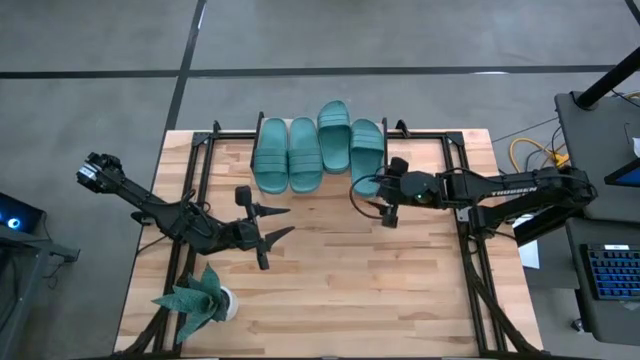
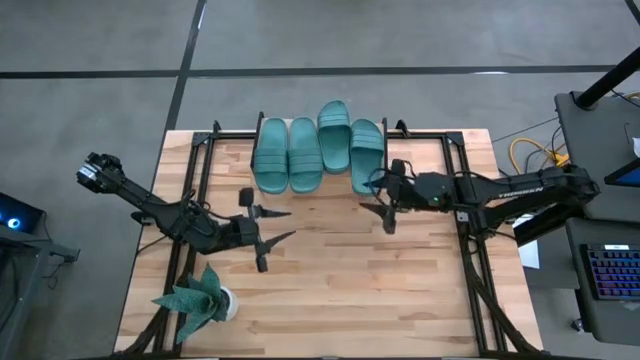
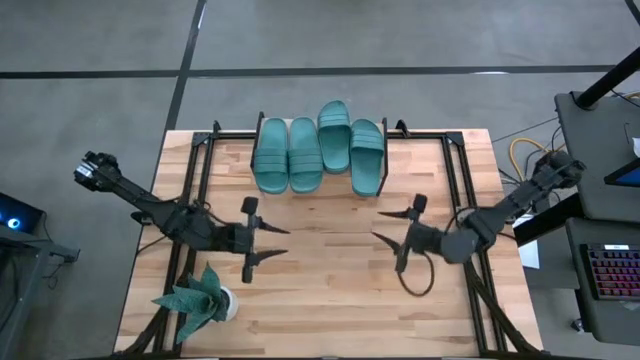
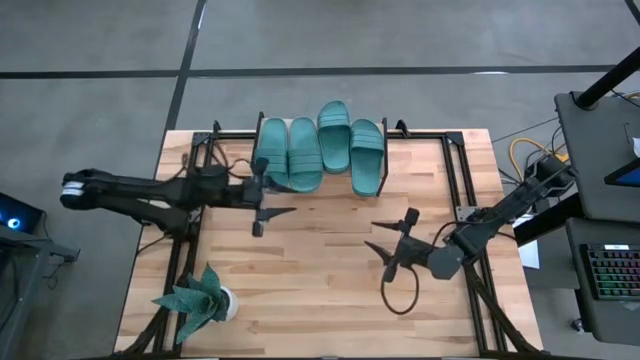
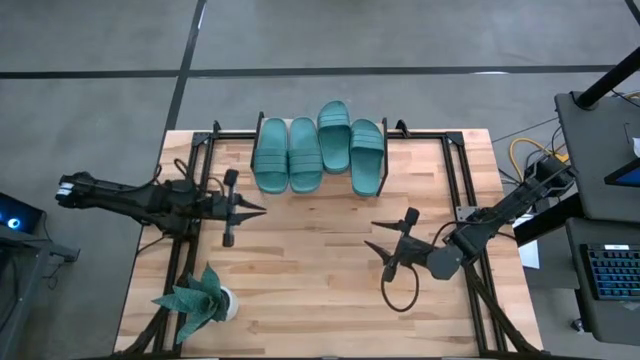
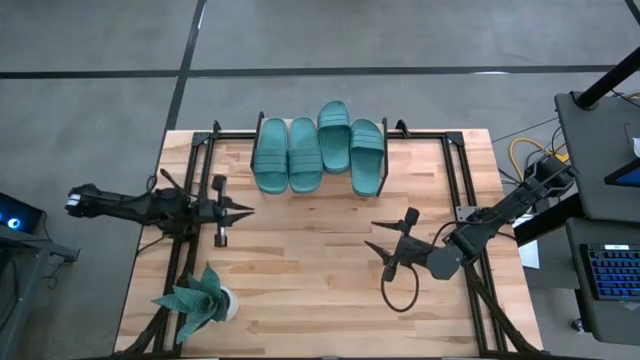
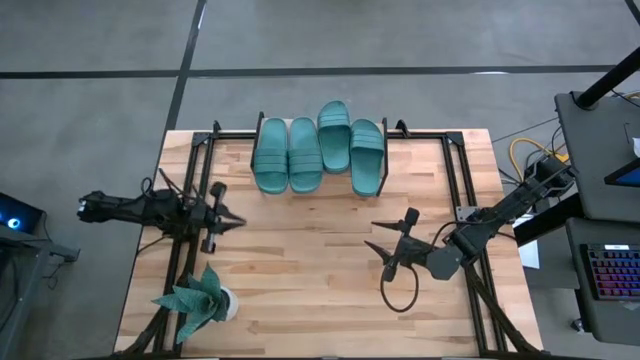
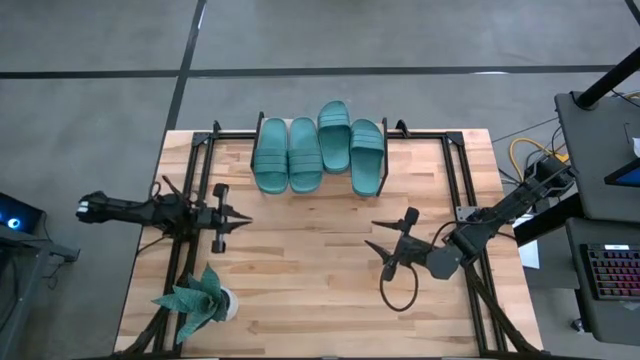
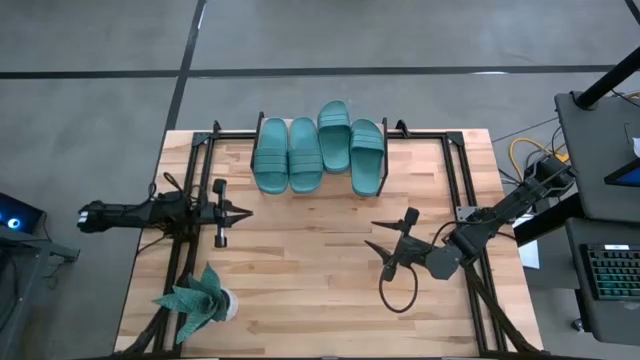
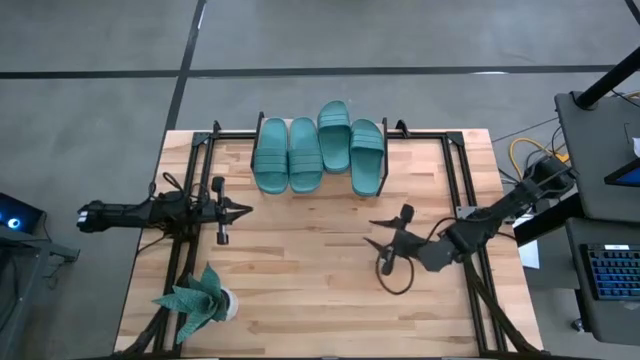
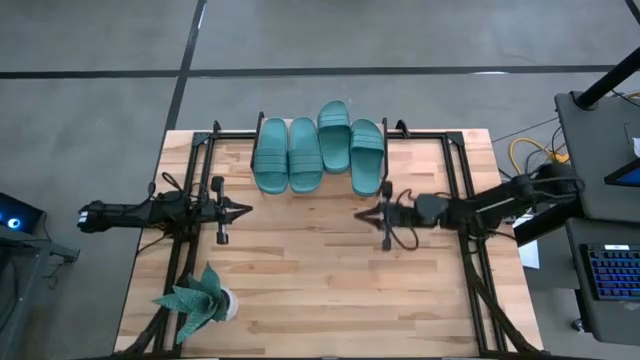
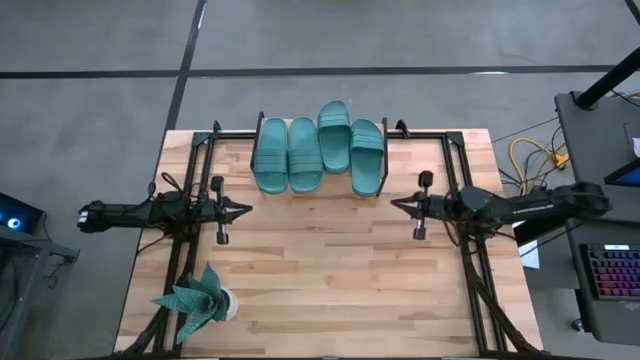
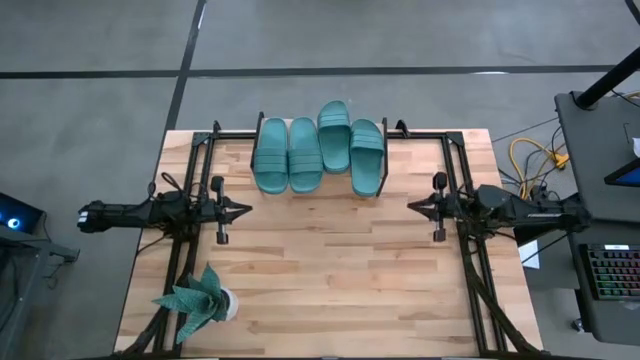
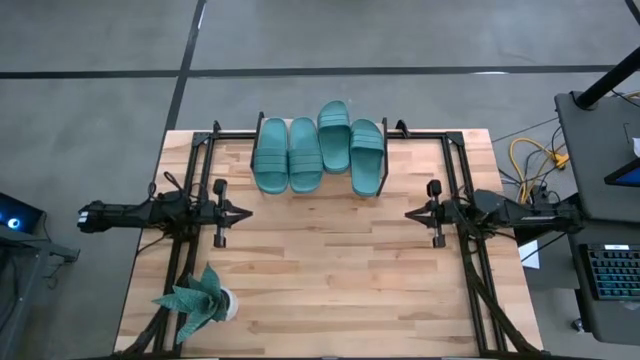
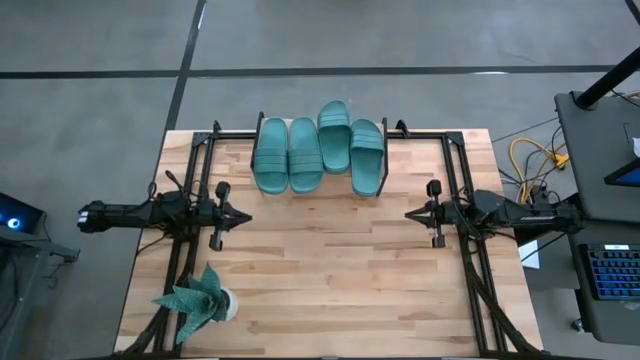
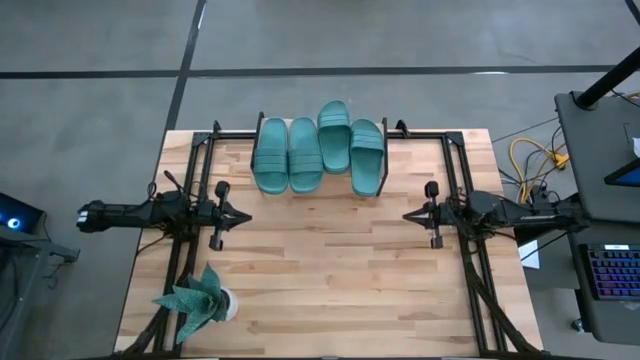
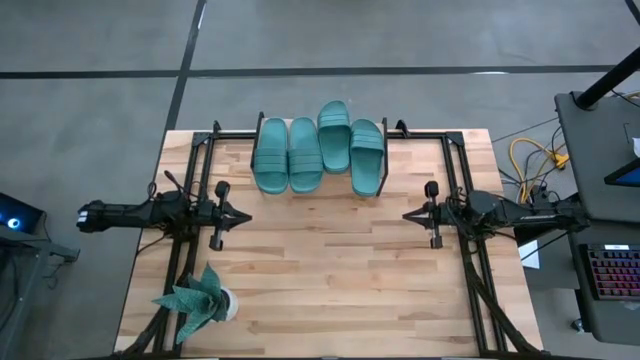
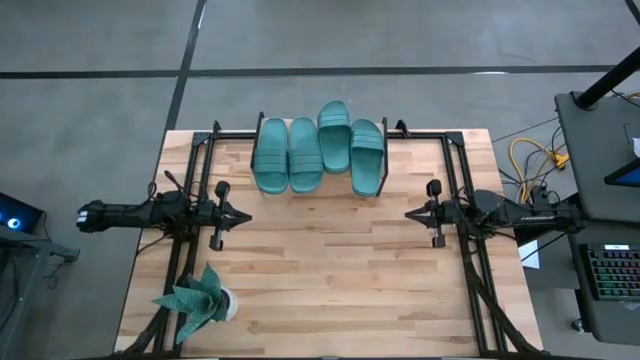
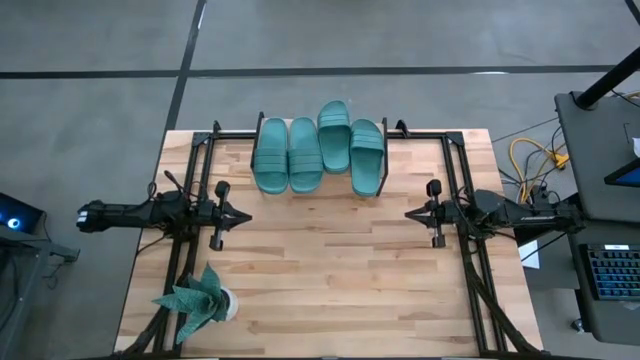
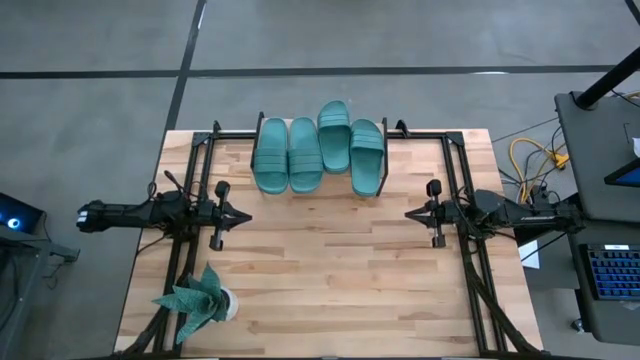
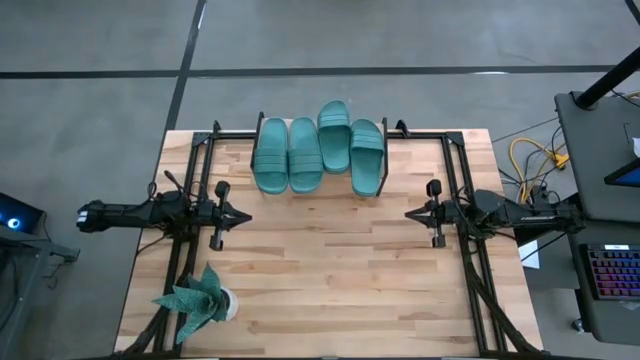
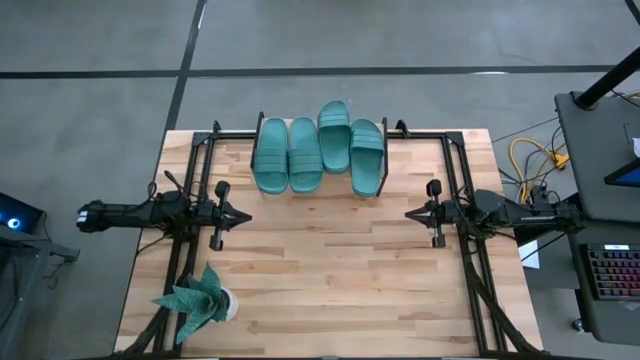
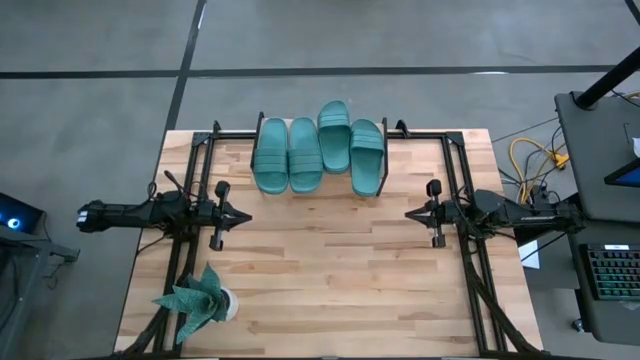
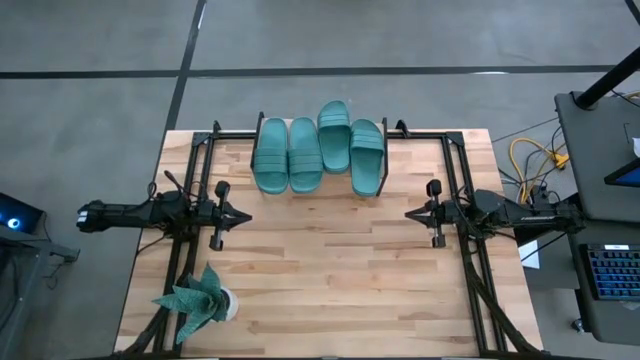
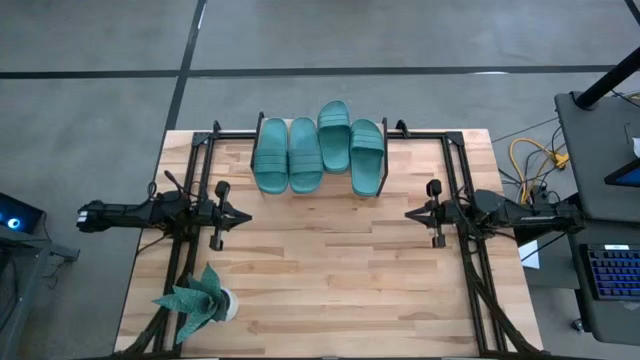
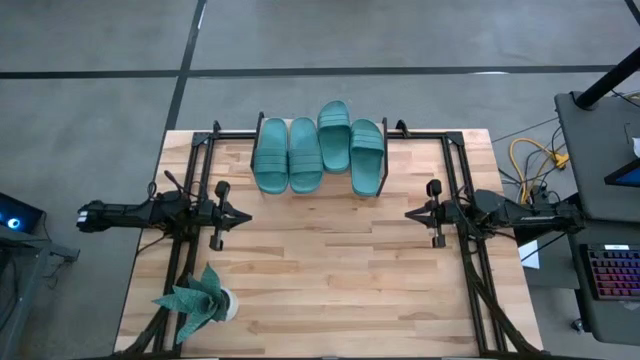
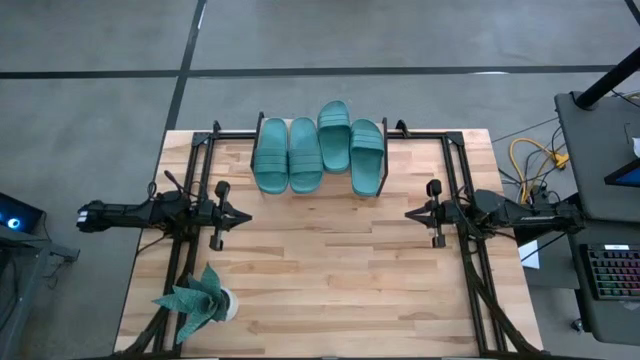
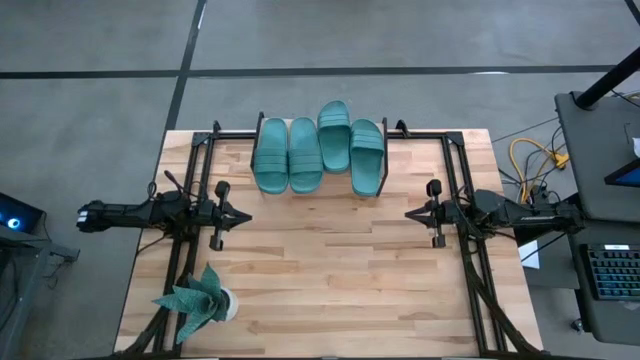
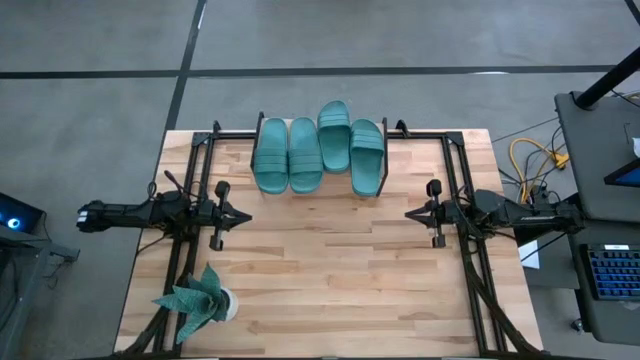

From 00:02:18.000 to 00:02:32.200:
Task: Pick and place slides into the shelf
Return to Home Position

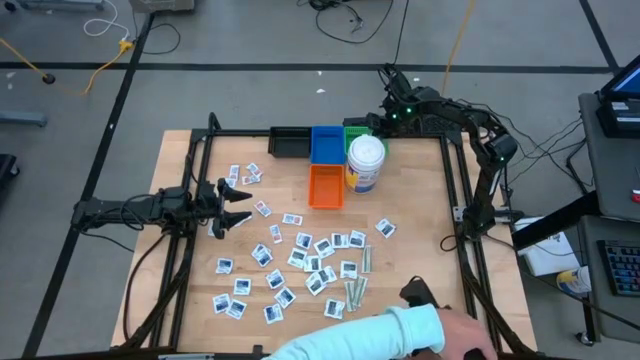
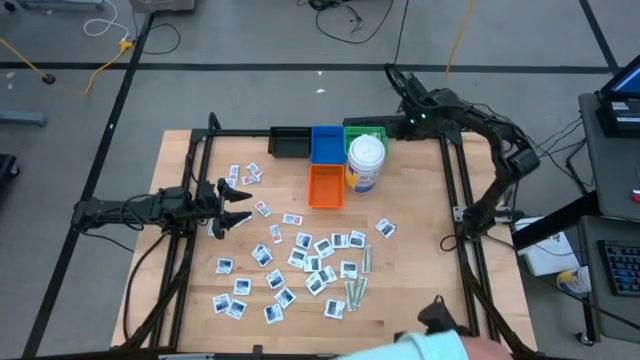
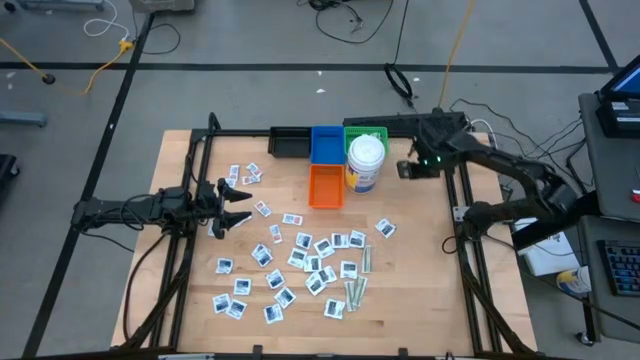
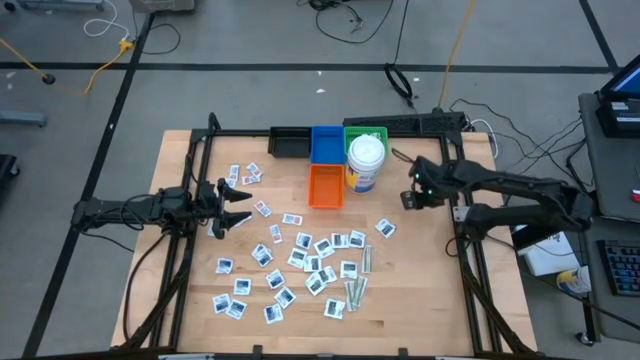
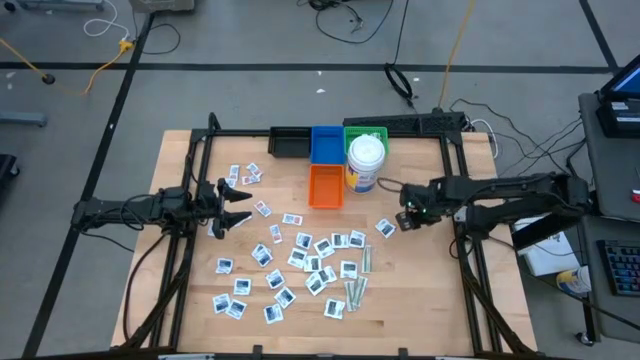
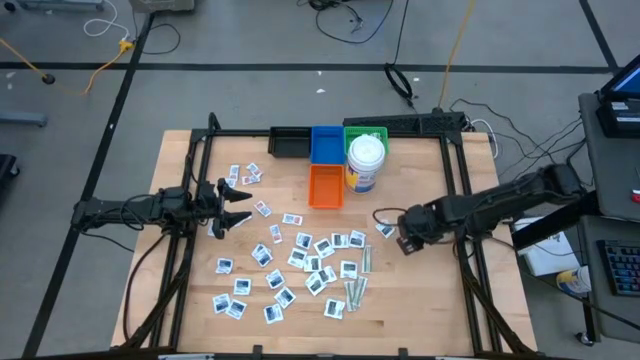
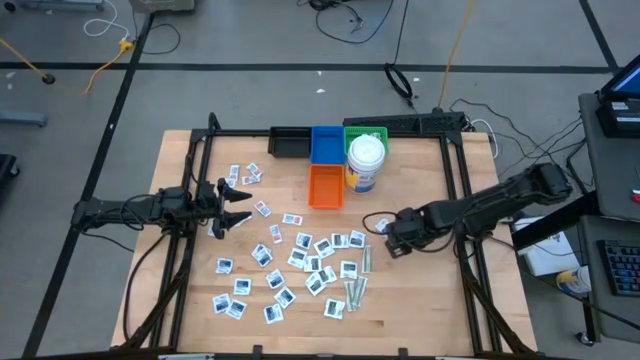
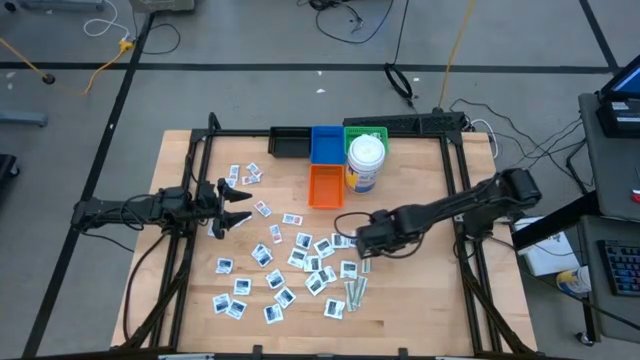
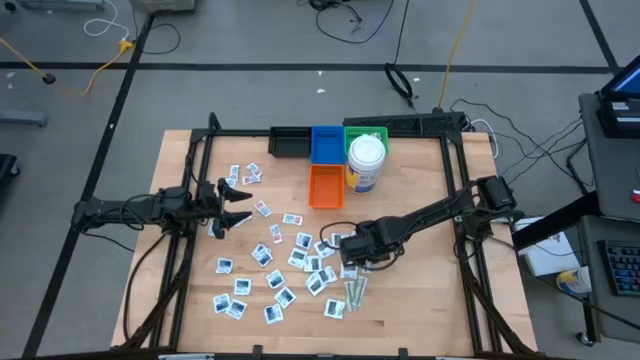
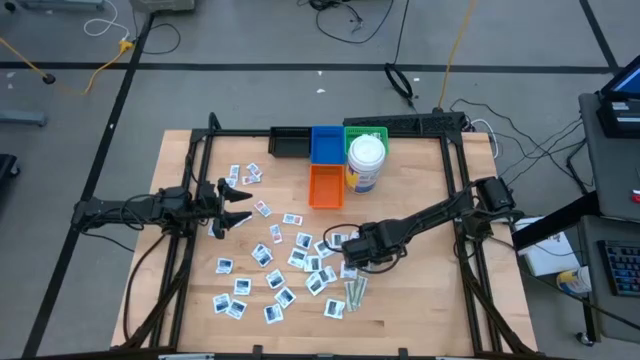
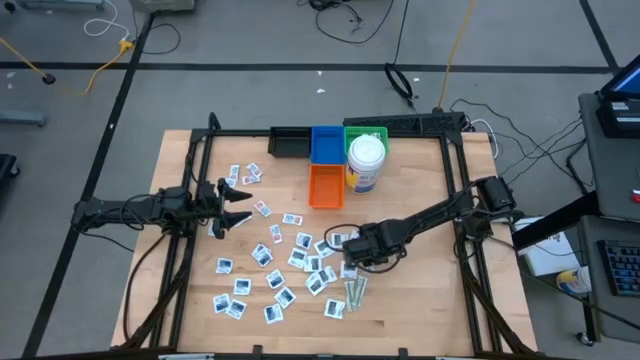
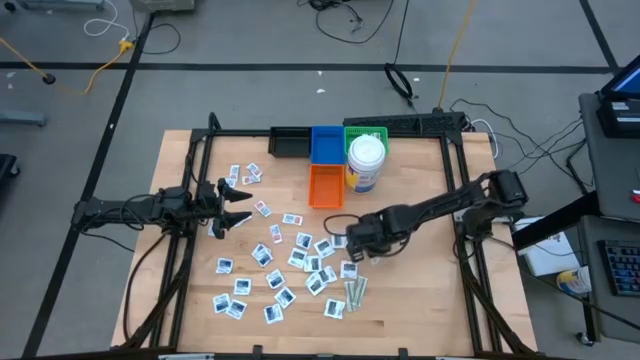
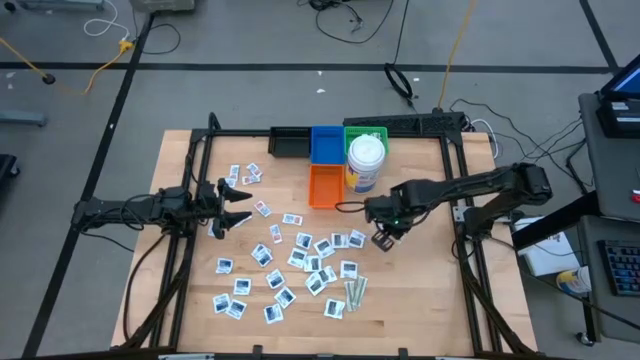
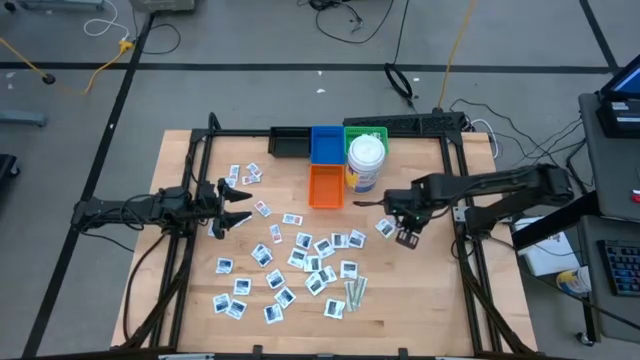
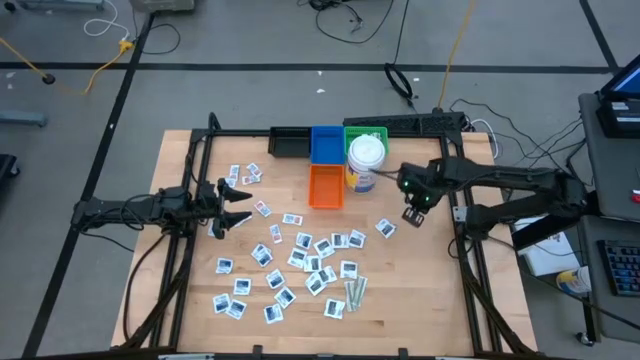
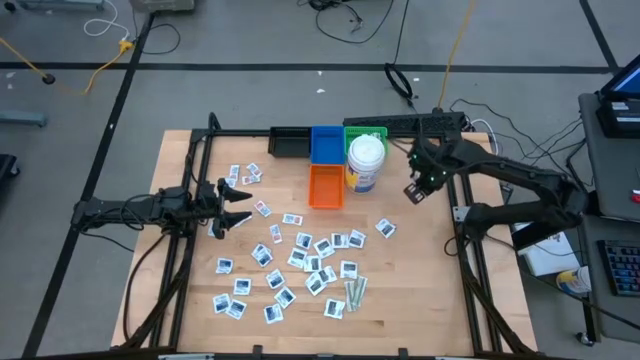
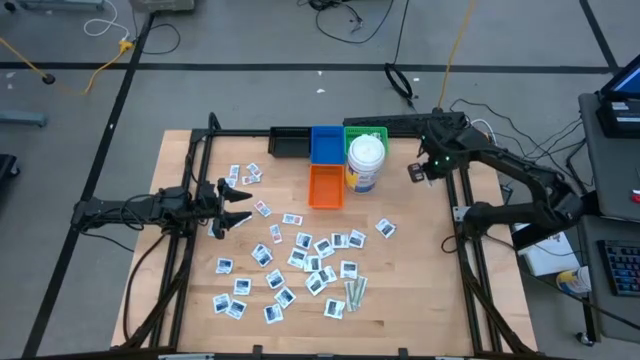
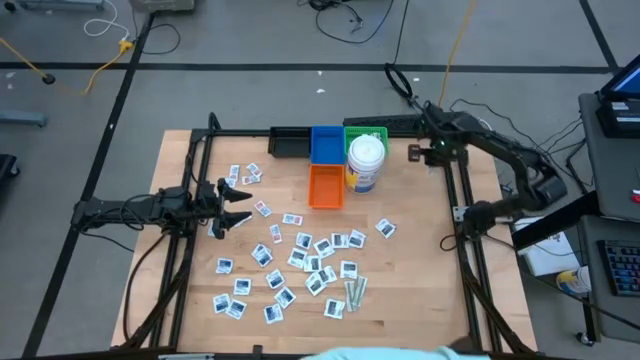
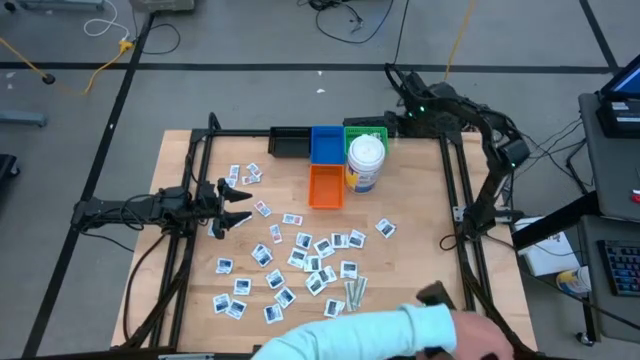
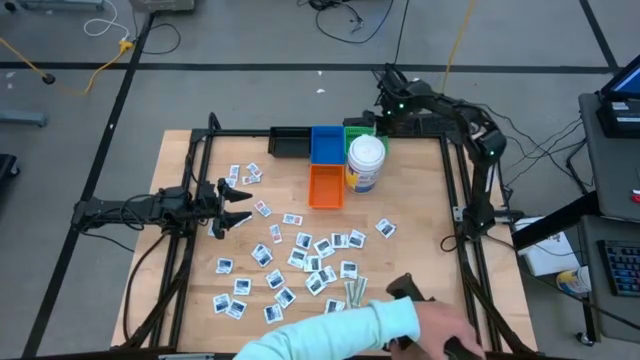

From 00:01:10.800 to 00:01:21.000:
Task: Pick & Place First Aid Supplies
Put the green bandage pack into the green bin
